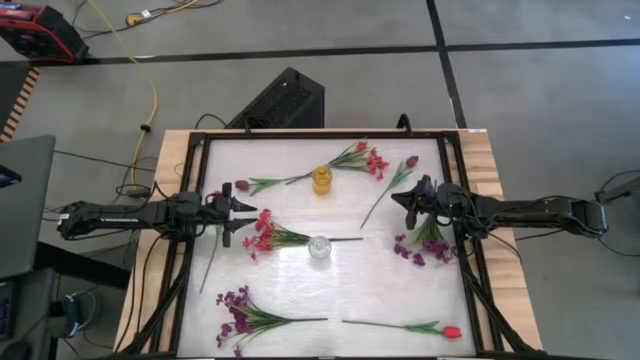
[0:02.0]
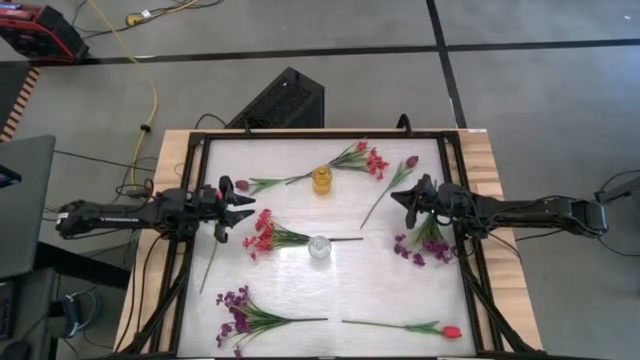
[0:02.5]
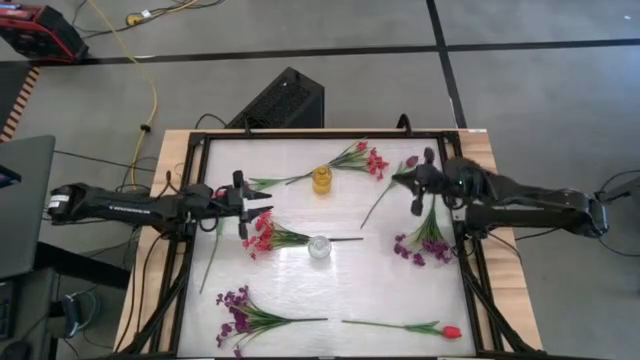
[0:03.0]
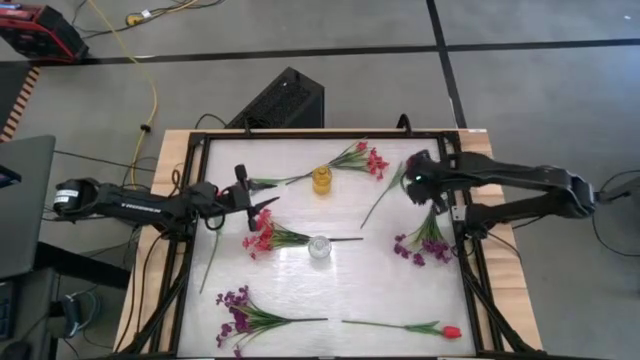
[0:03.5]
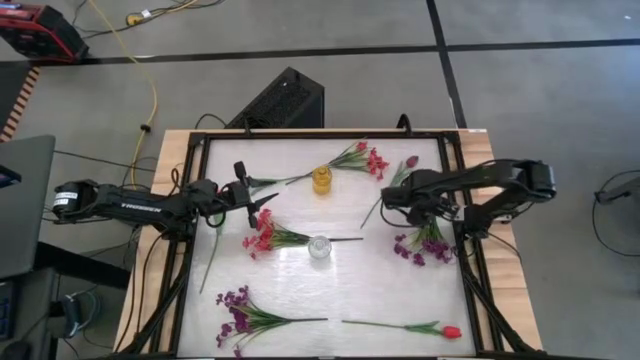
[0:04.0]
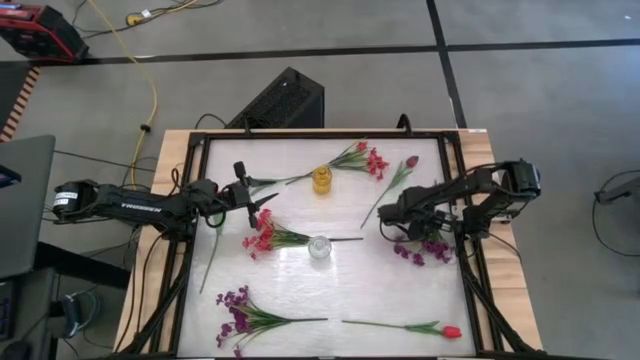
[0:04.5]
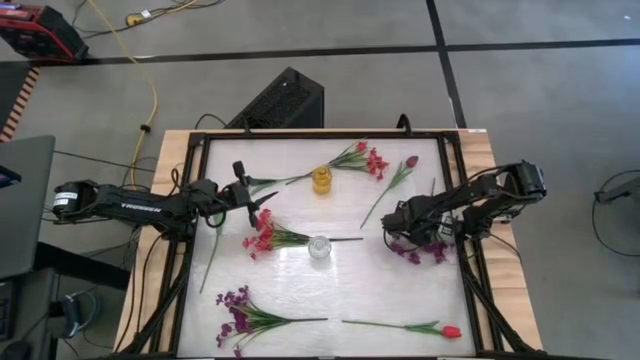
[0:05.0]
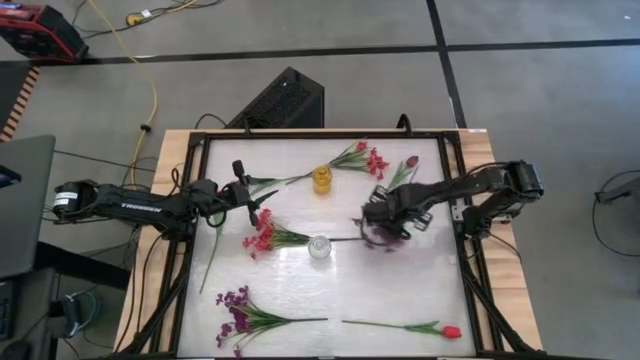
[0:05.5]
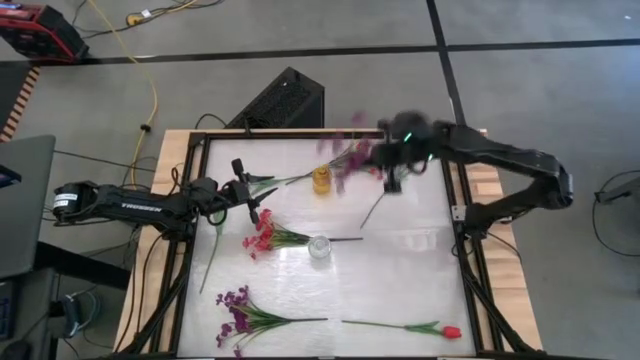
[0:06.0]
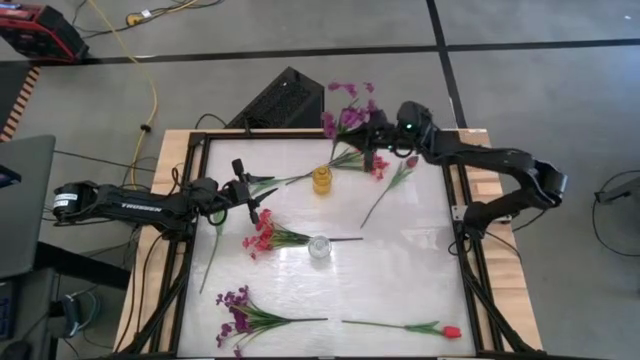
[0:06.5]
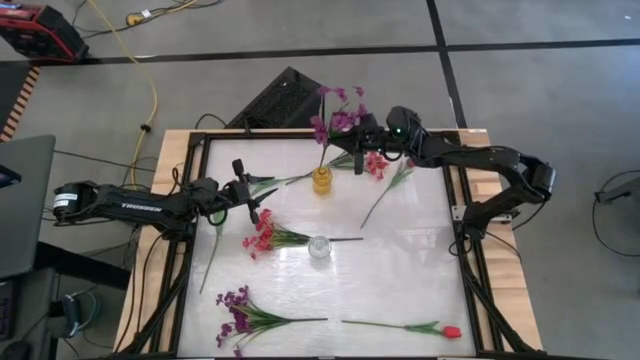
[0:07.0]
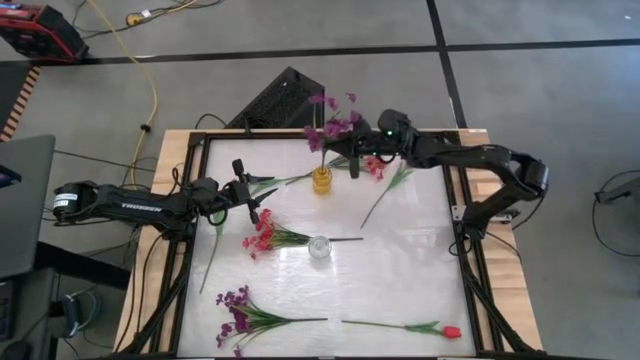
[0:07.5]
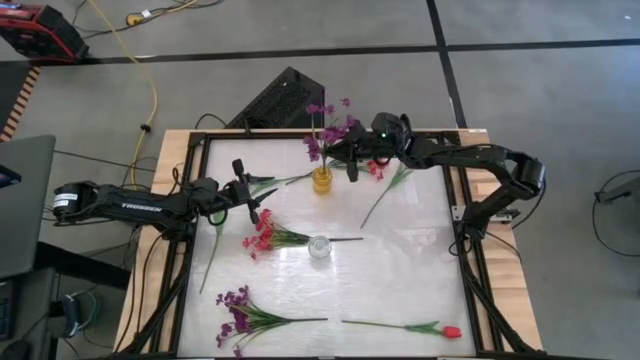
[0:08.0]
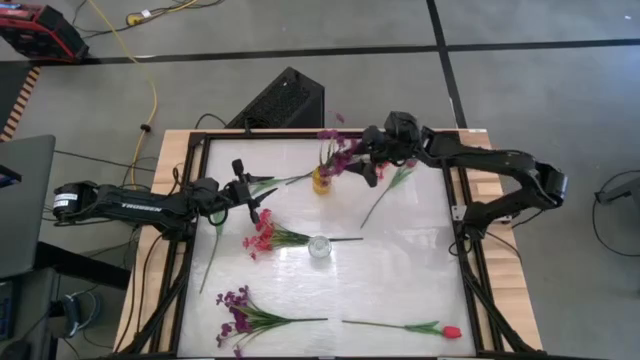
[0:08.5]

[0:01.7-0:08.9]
Task: Sort flowers into vase by color
Put the top purple flowers into the yellow vase

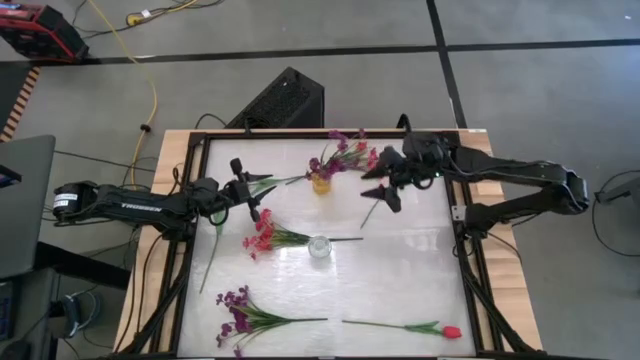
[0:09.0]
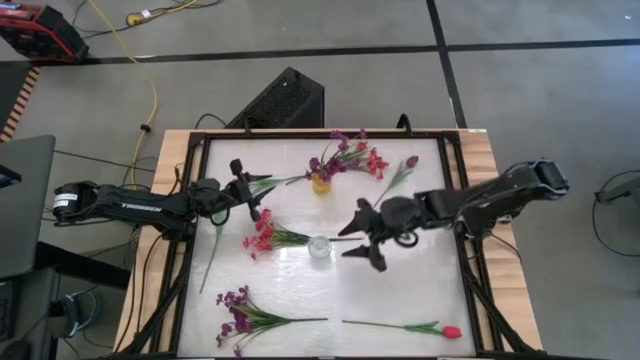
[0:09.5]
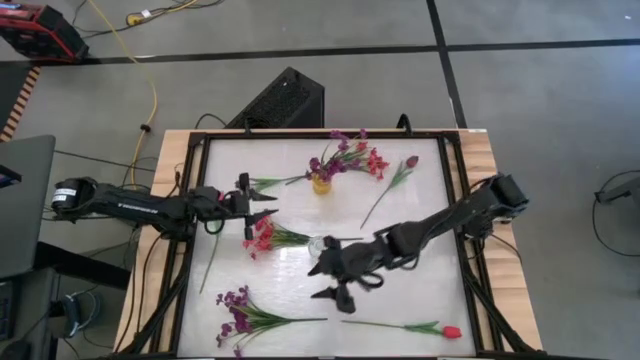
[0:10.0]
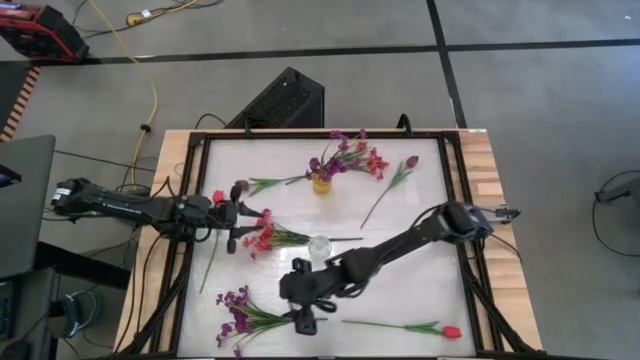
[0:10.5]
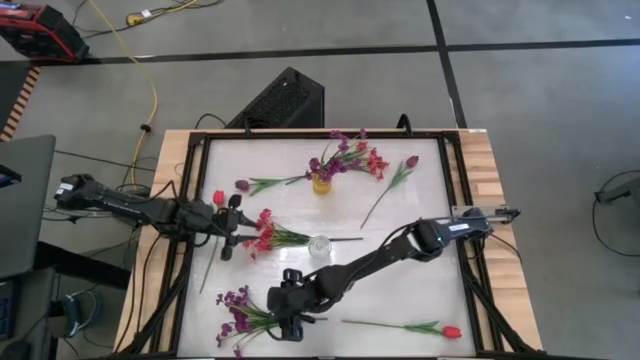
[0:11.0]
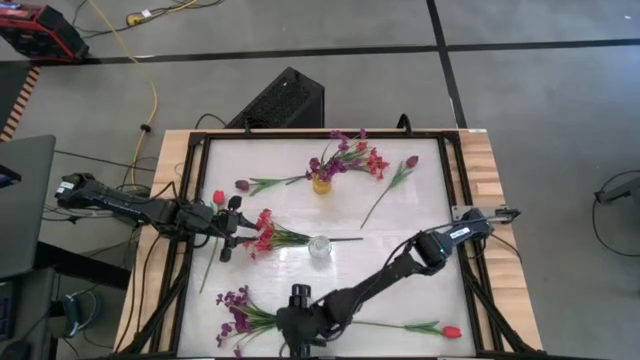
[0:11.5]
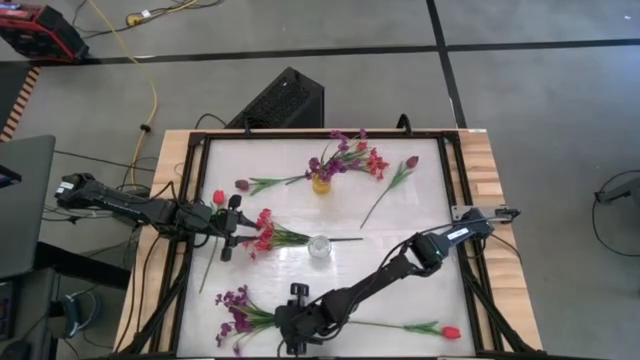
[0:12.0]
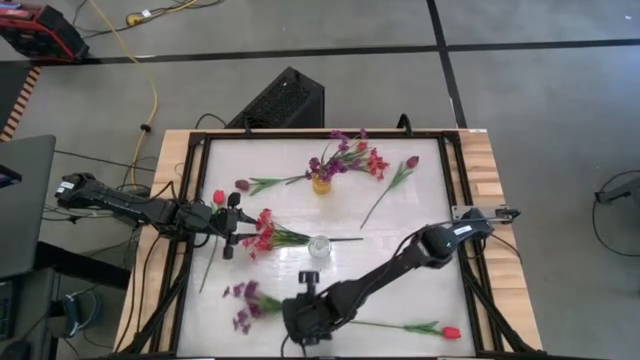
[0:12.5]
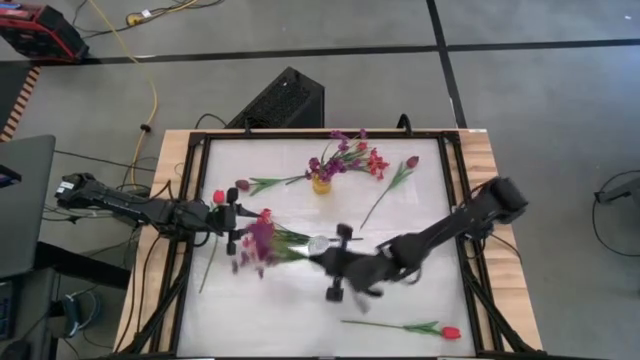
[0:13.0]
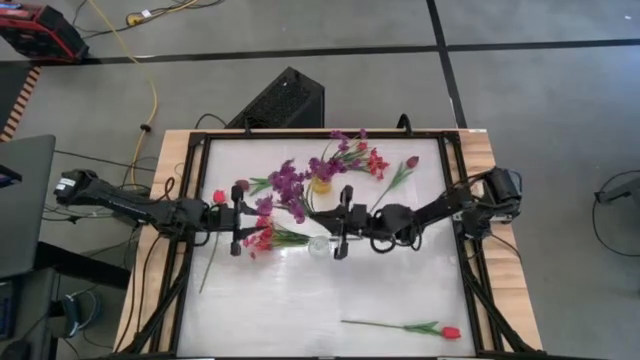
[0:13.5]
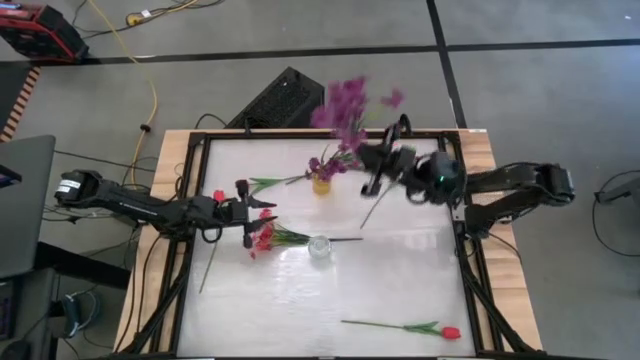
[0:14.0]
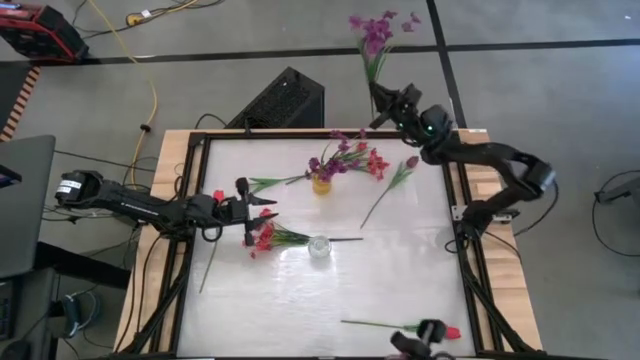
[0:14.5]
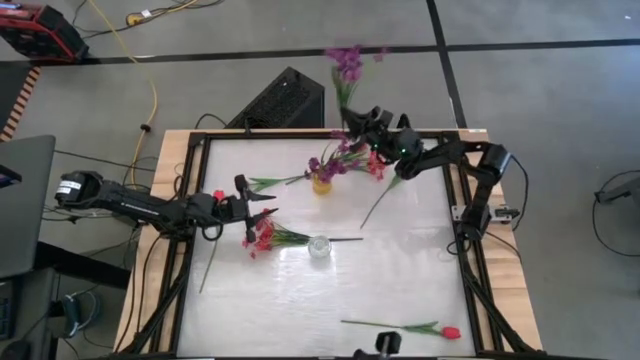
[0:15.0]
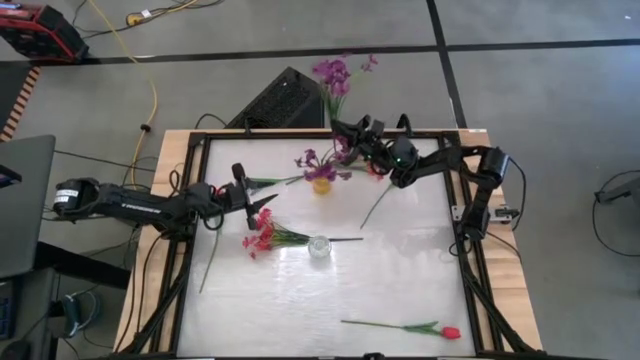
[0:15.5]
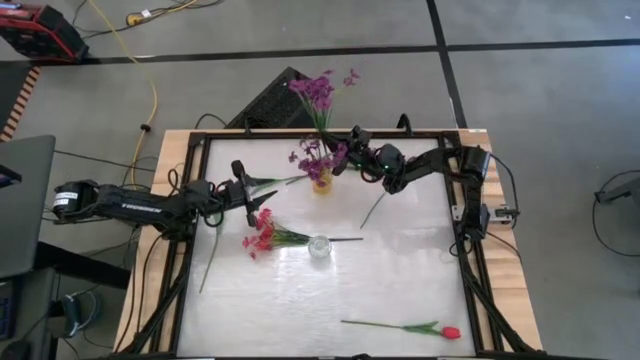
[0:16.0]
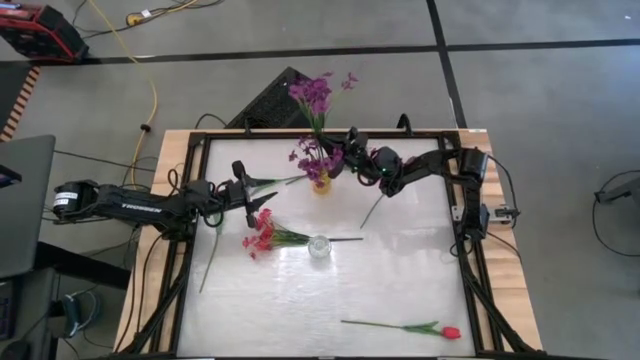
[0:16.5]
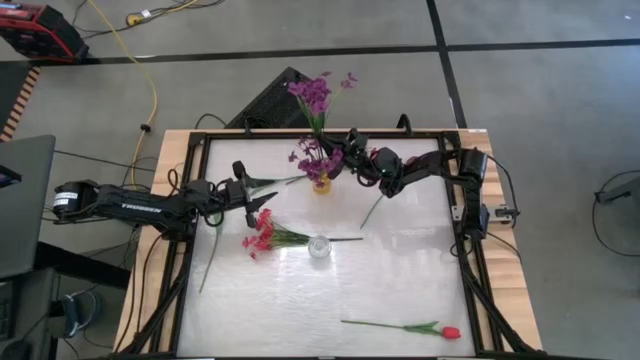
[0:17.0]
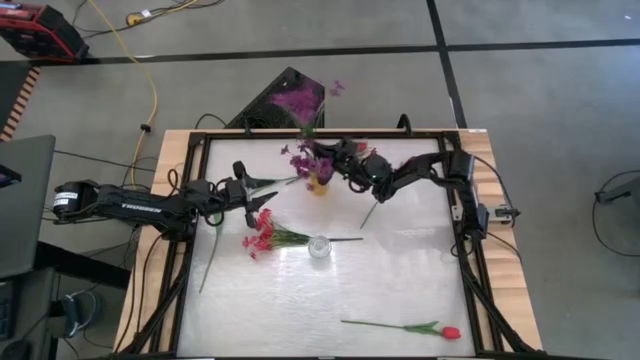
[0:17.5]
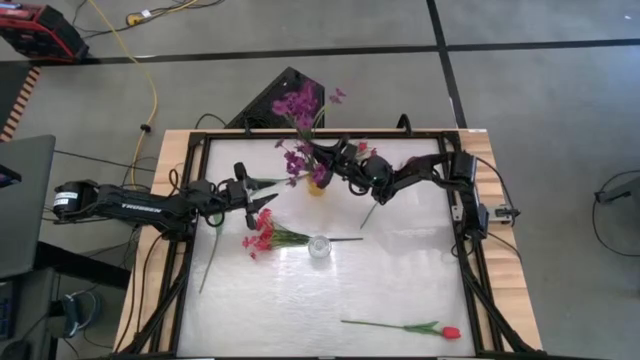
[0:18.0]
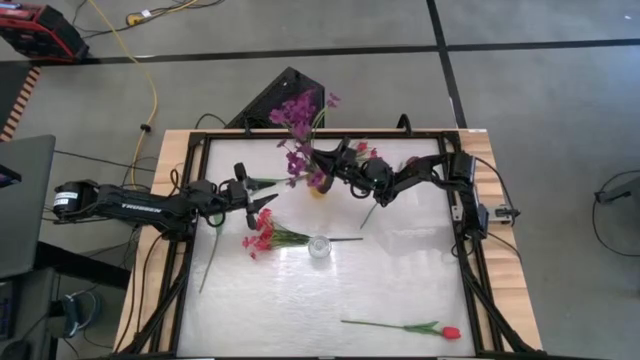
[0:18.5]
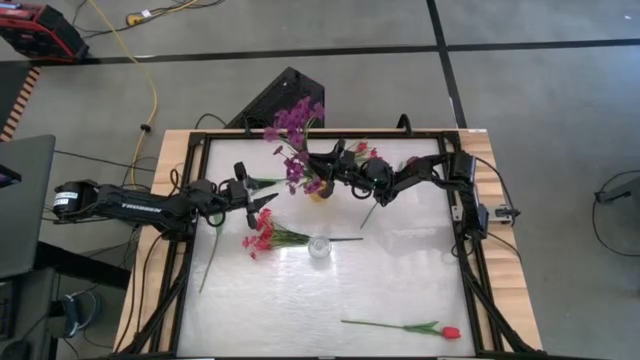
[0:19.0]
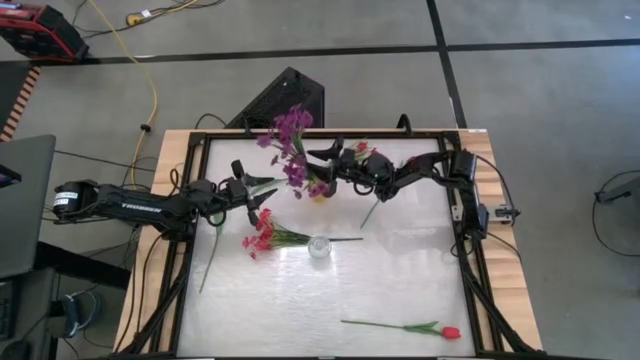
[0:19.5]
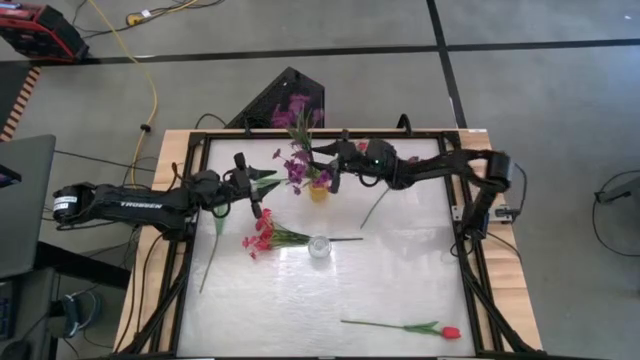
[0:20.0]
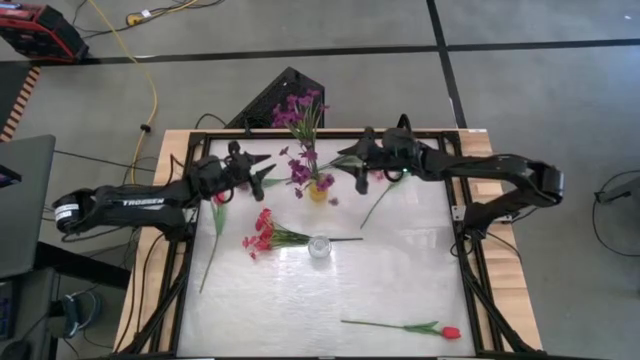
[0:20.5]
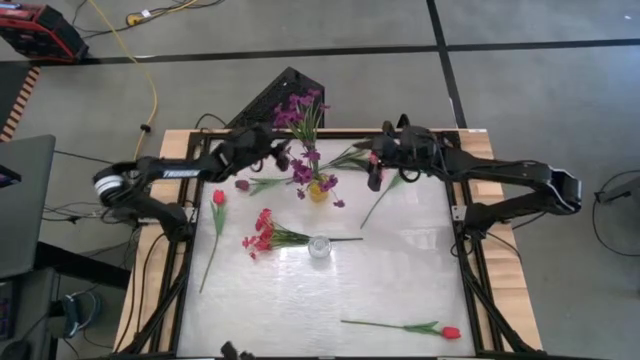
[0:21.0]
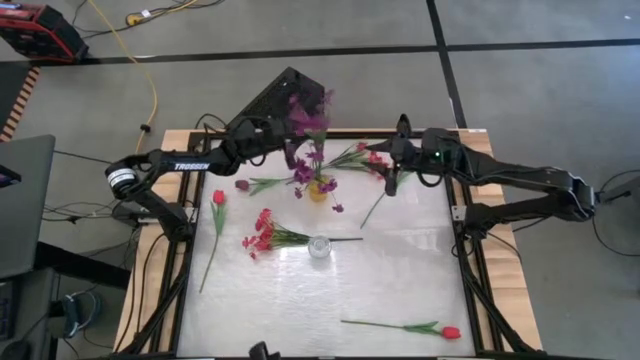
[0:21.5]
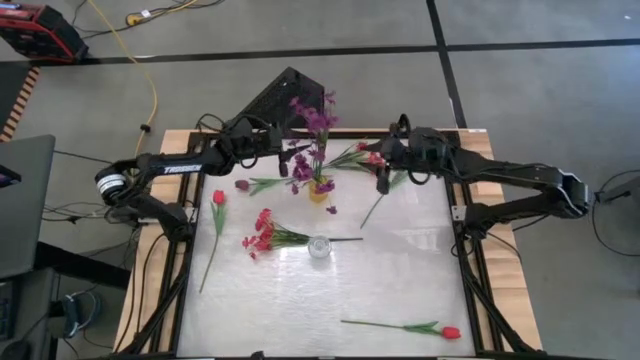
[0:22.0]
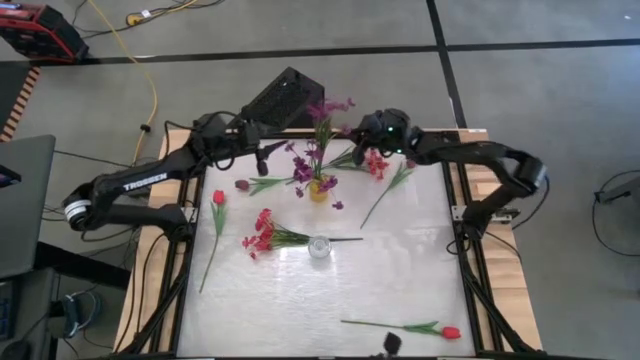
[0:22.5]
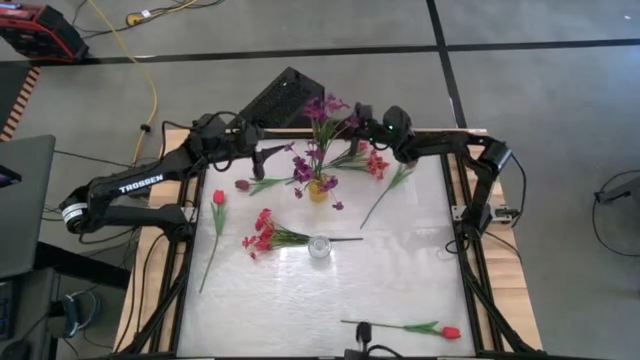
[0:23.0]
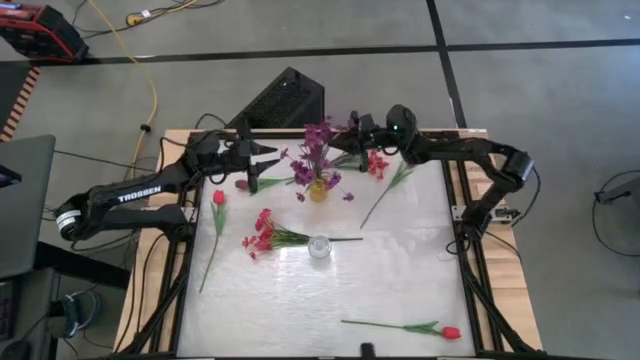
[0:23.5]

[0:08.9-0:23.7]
Put the purple flowers into the top center yellow crystal vase
